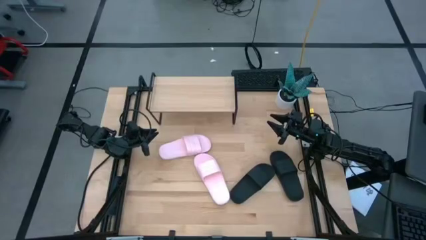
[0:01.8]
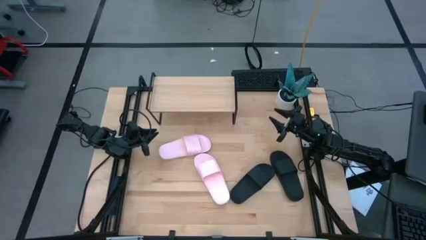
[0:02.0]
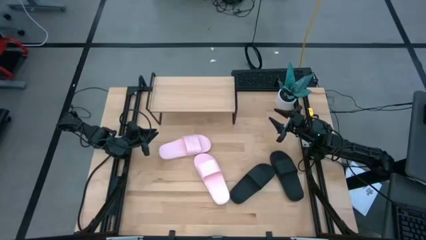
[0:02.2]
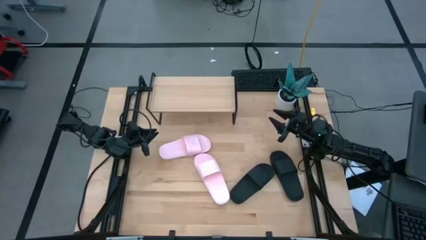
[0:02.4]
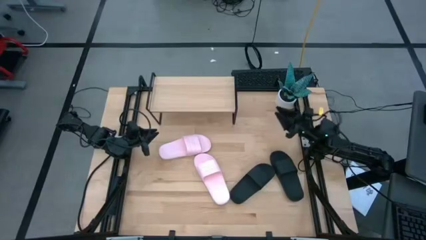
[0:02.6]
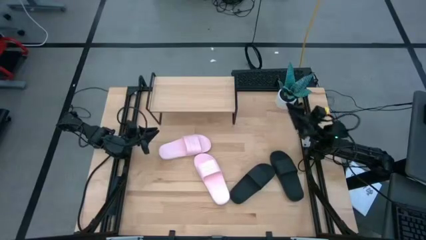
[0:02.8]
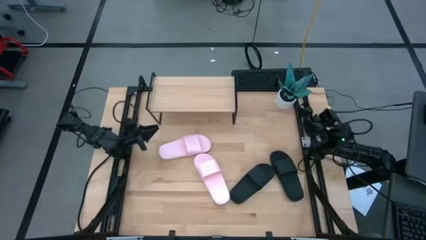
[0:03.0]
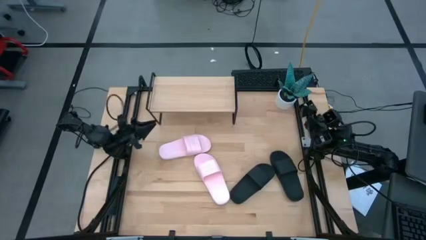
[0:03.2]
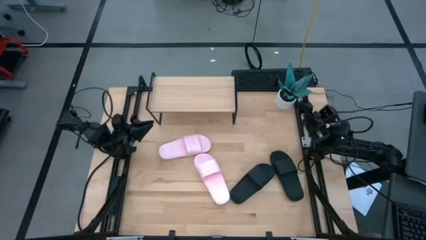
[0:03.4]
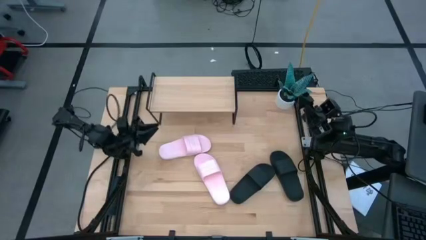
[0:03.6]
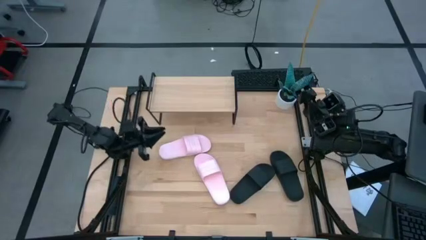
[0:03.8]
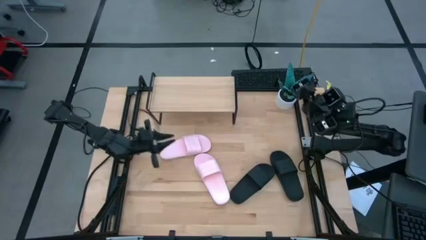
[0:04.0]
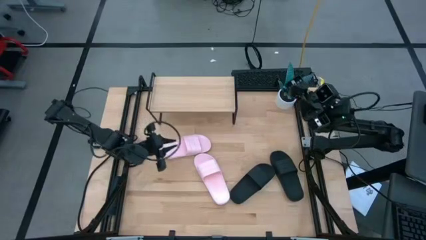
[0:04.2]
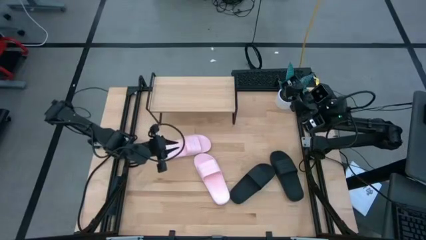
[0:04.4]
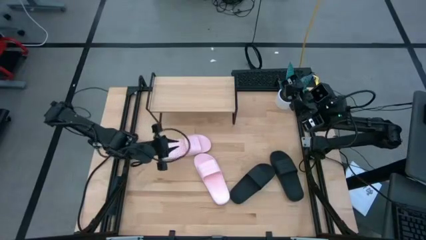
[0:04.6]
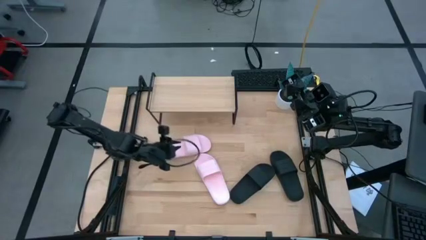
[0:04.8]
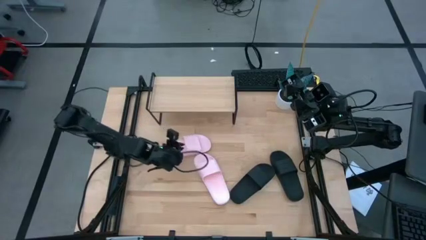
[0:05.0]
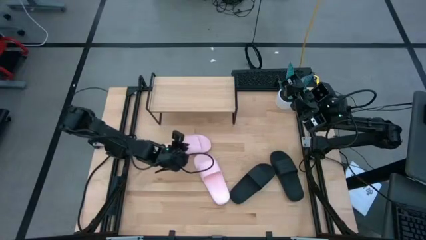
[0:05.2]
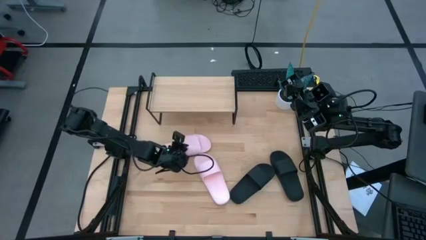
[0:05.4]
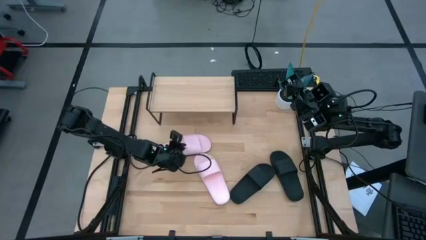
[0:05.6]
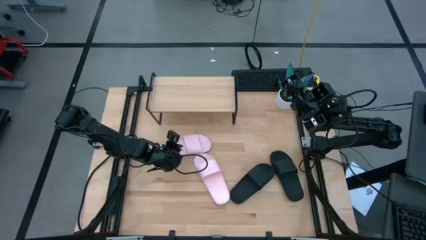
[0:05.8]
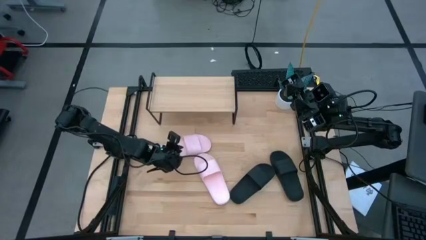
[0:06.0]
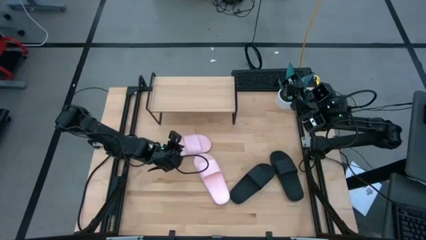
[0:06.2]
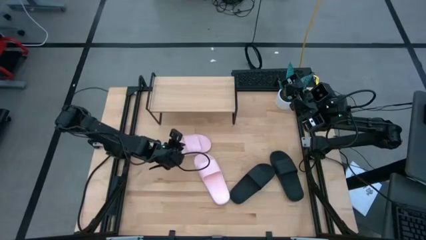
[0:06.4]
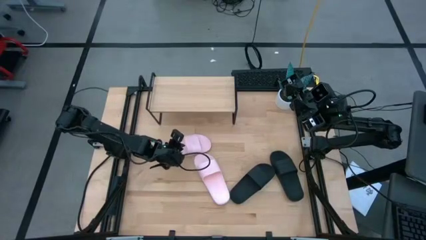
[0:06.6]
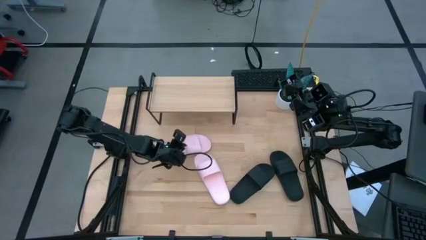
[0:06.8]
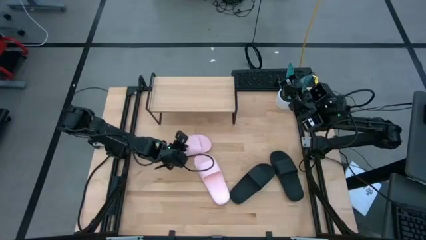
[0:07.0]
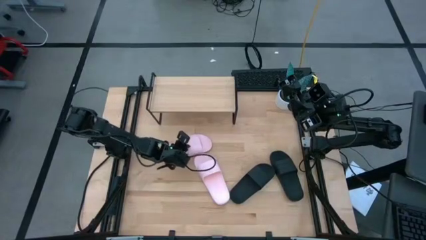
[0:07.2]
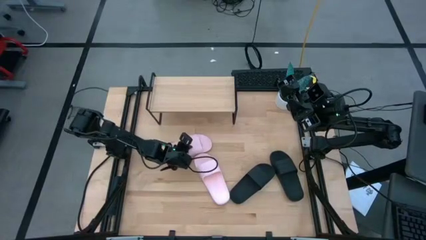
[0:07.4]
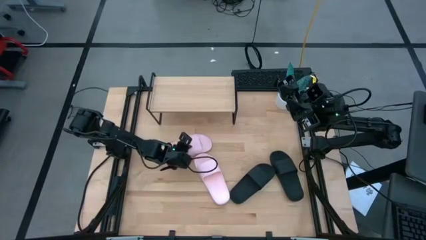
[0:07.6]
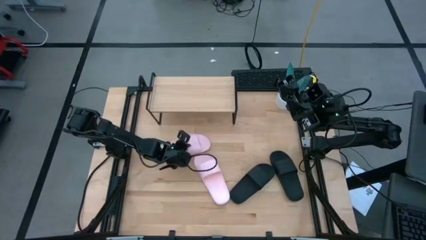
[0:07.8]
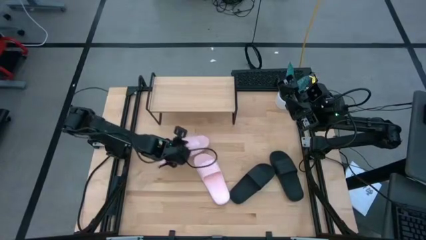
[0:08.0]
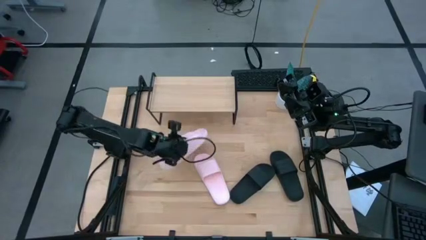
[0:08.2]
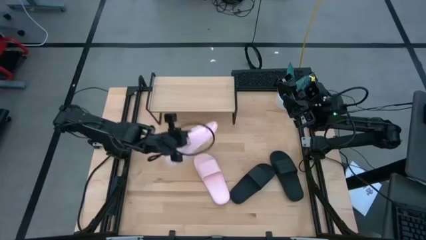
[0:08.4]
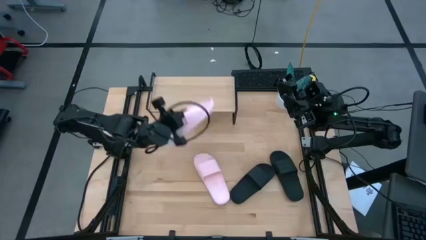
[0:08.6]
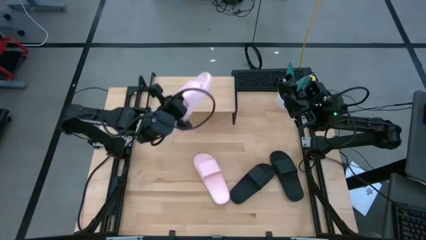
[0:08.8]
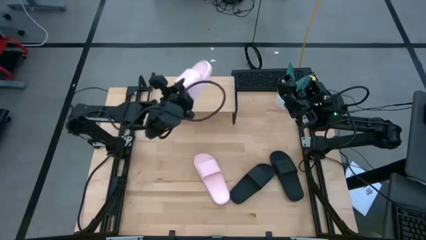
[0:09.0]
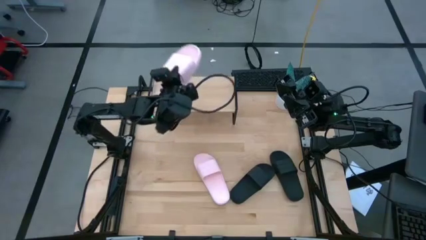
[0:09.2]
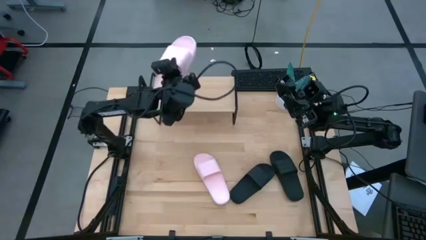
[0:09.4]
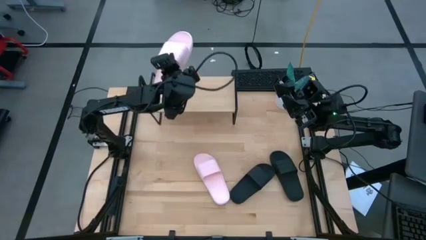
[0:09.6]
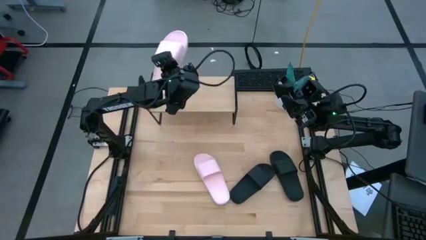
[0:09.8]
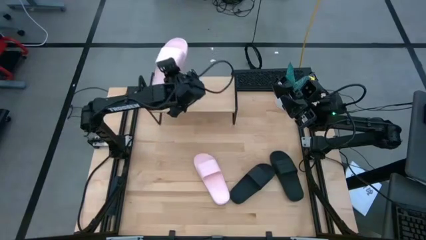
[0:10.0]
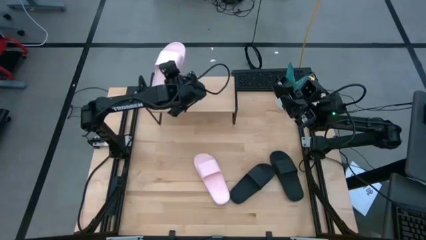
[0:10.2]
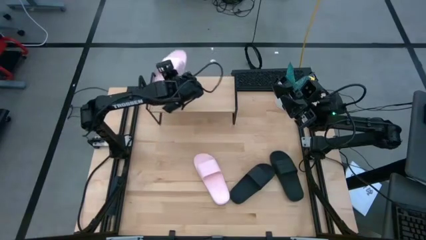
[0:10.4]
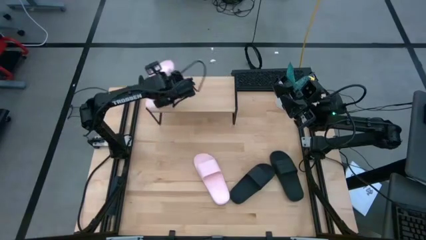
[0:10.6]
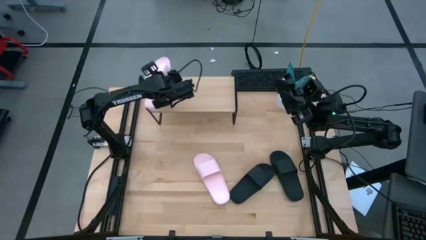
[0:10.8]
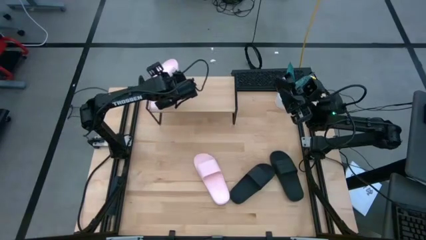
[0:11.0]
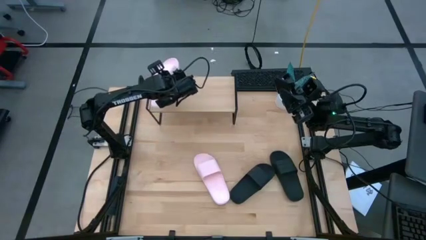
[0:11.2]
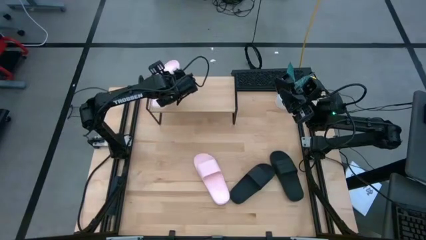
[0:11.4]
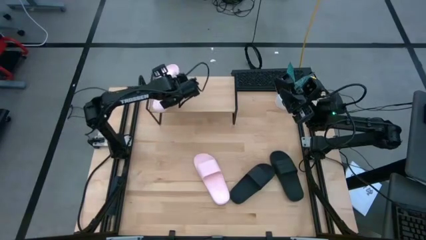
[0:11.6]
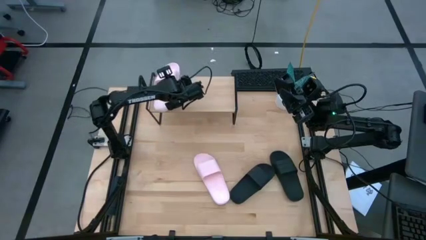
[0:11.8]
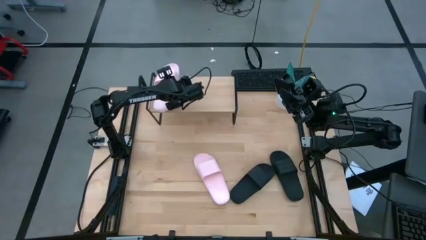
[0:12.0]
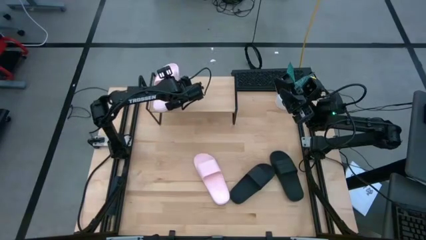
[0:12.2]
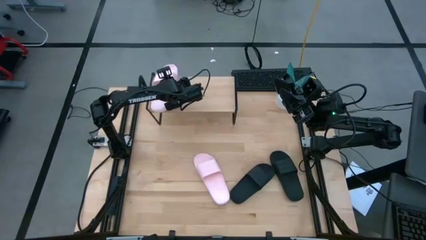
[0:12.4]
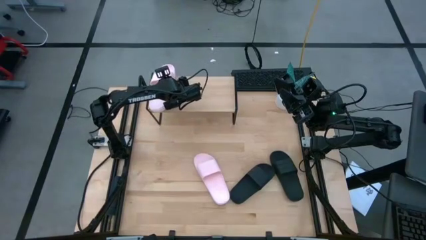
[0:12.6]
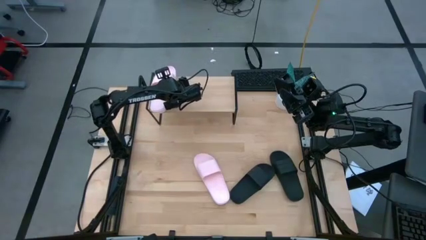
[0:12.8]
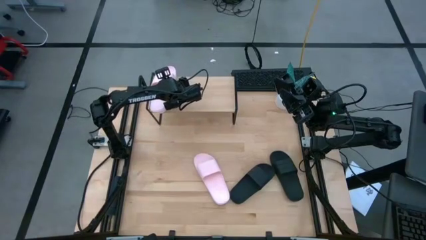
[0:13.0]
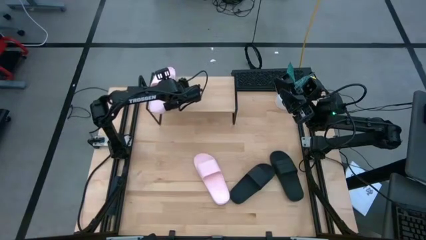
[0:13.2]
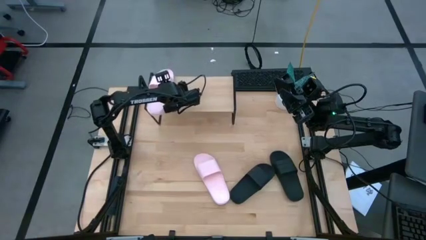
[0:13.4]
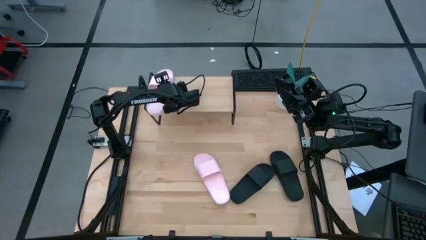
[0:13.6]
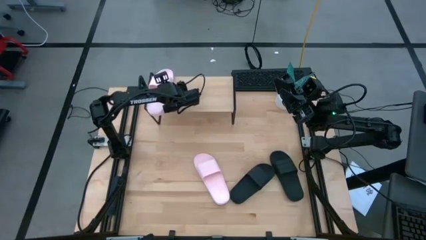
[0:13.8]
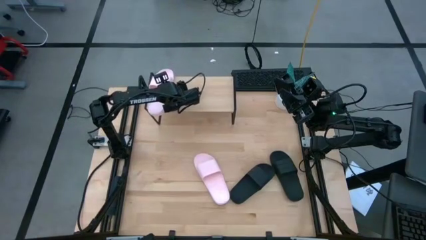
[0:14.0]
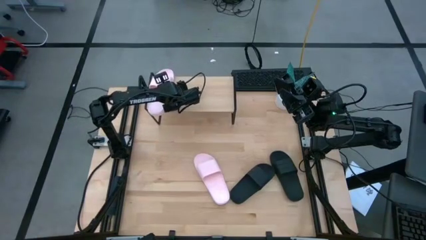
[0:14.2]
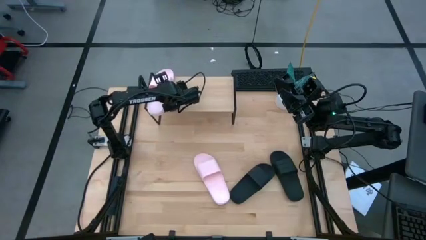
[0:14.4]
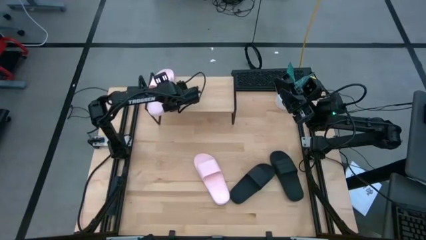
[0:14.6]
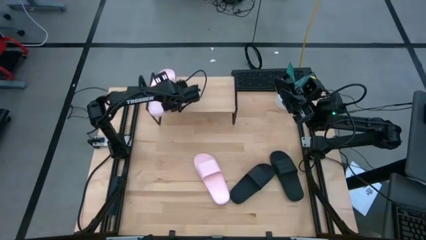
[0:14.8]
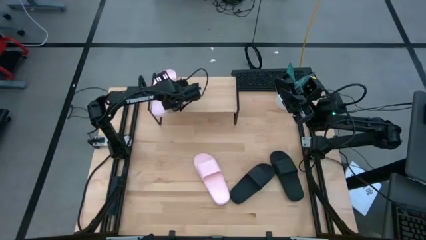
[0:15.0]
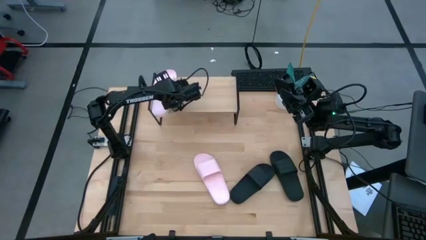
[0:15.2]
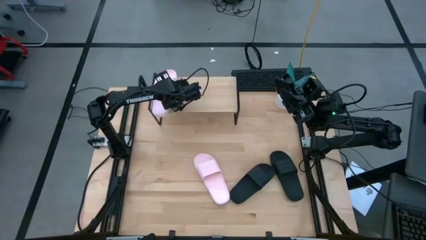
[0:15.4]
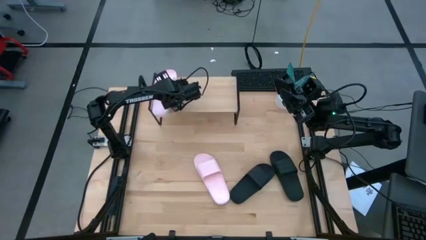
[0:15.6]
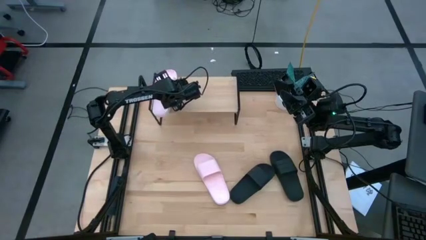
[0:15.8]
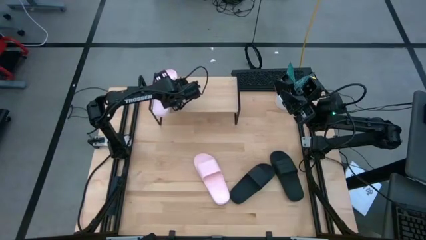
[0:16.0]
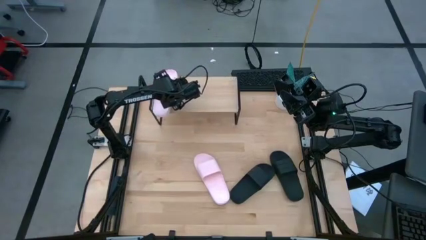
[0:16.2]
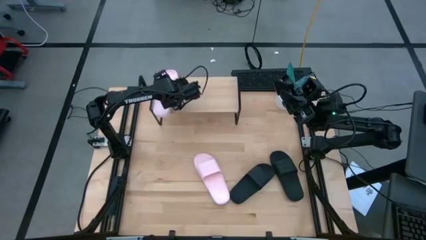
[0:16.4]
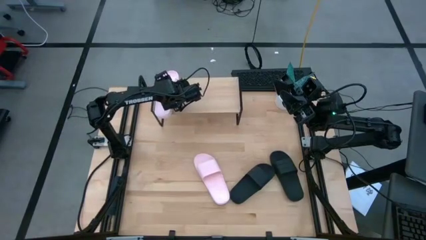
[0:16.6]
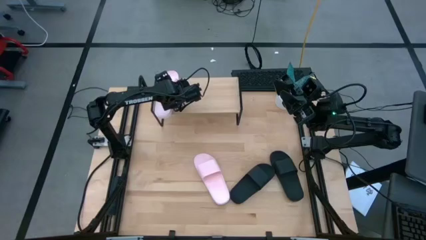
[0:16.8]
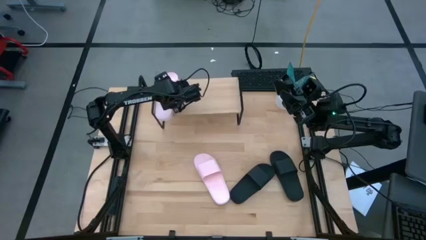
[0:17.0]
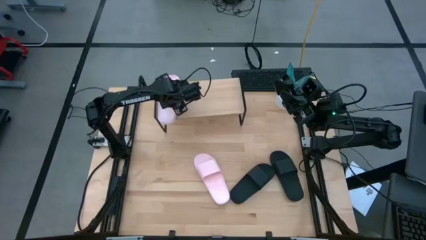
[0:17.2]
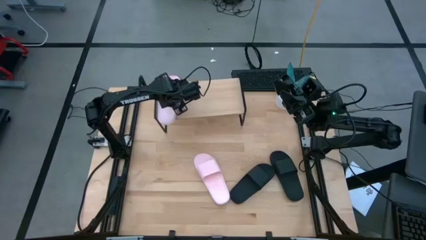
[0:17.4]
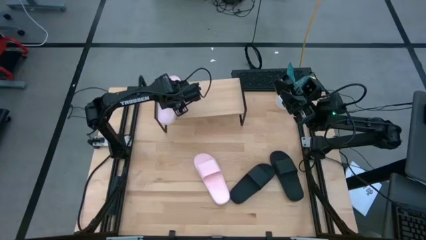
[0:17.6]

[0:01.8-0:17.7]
Task: Pick and place slides into the shelf
Put the top pink slipper on the shelf
